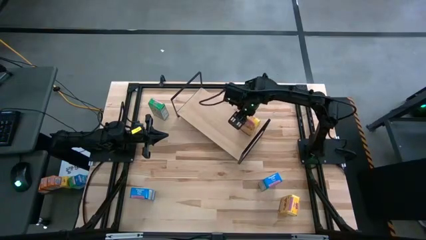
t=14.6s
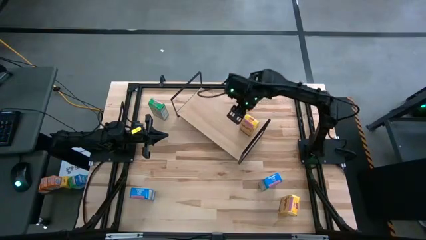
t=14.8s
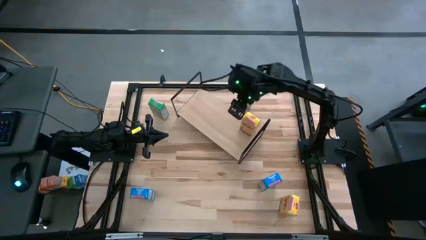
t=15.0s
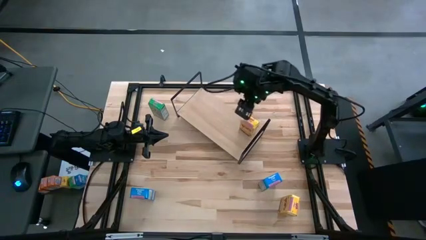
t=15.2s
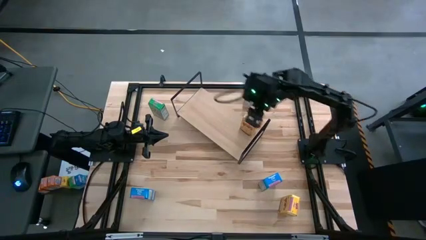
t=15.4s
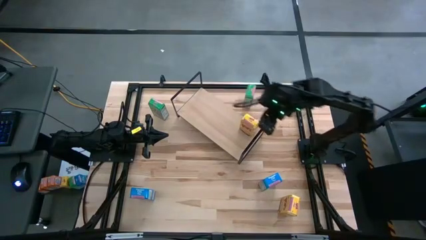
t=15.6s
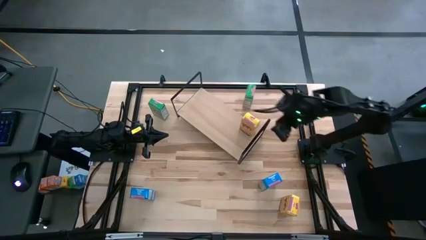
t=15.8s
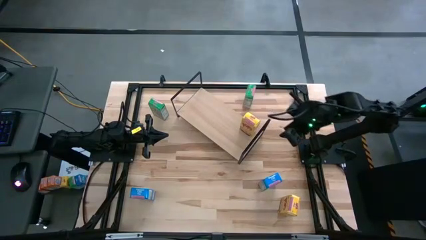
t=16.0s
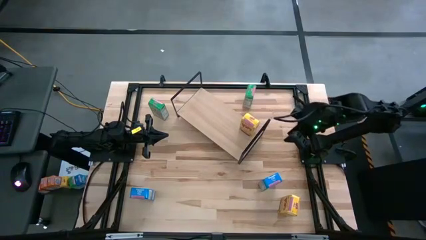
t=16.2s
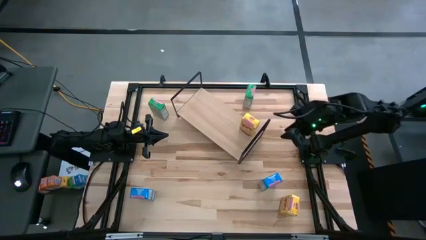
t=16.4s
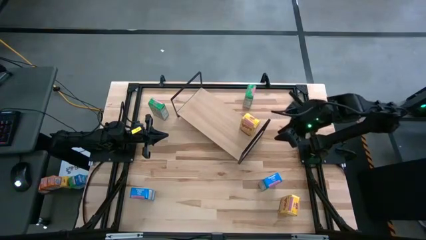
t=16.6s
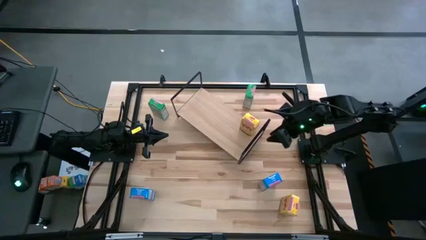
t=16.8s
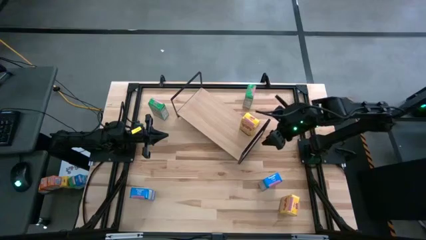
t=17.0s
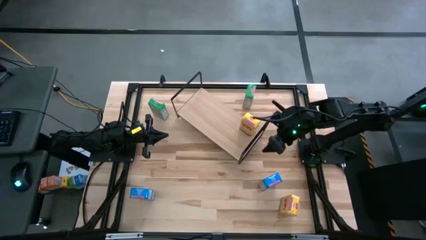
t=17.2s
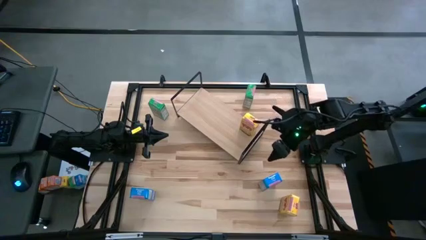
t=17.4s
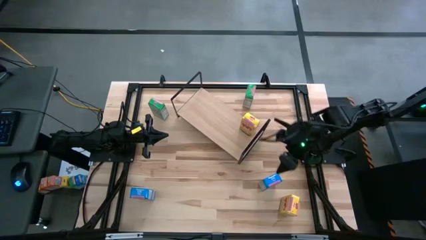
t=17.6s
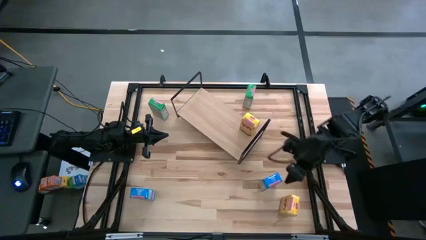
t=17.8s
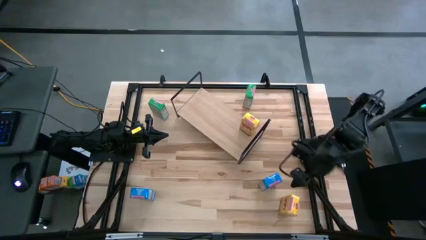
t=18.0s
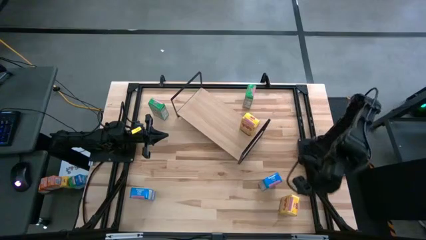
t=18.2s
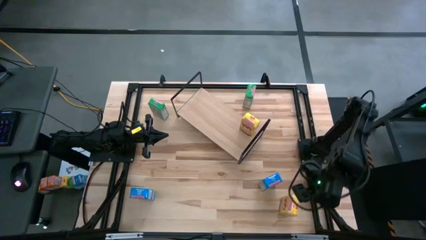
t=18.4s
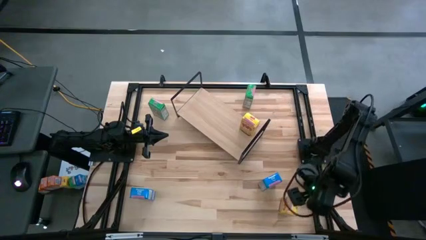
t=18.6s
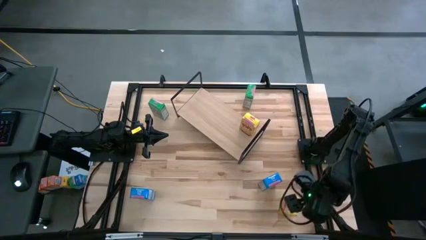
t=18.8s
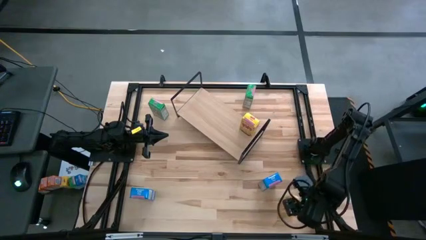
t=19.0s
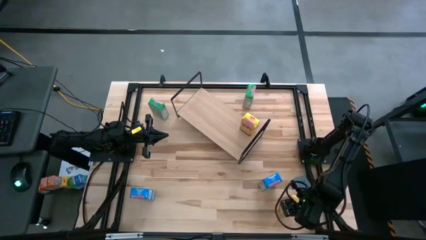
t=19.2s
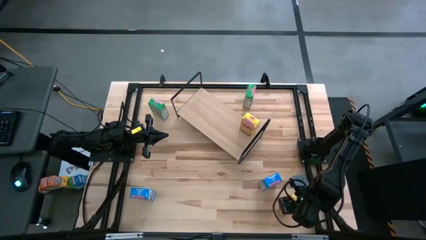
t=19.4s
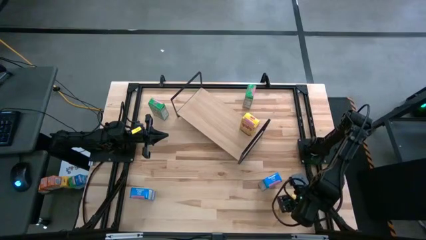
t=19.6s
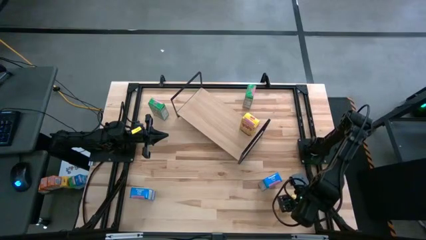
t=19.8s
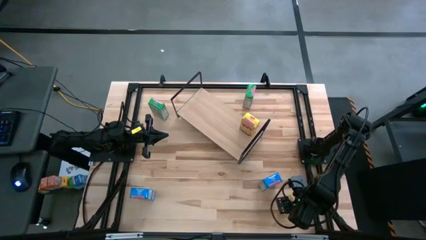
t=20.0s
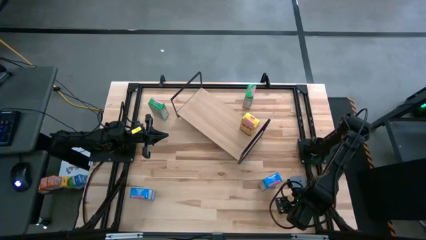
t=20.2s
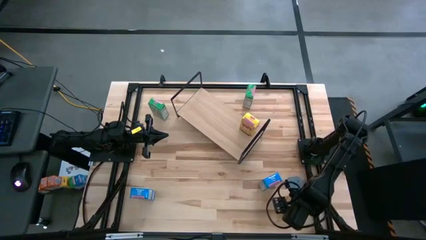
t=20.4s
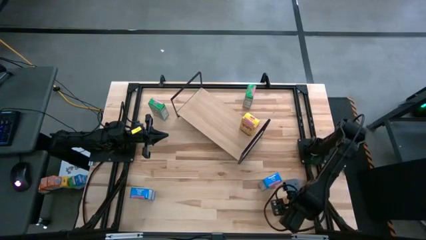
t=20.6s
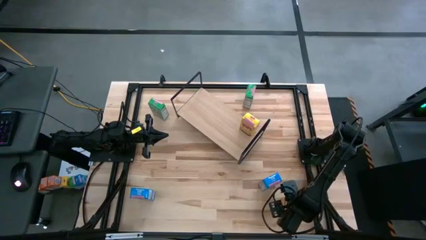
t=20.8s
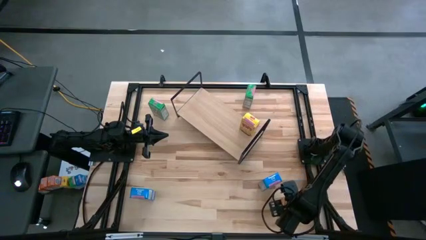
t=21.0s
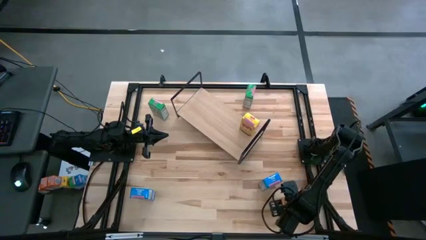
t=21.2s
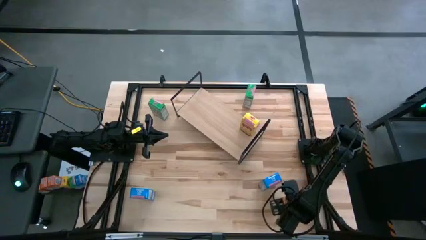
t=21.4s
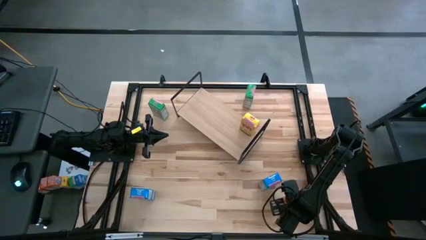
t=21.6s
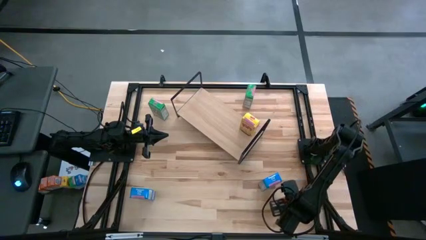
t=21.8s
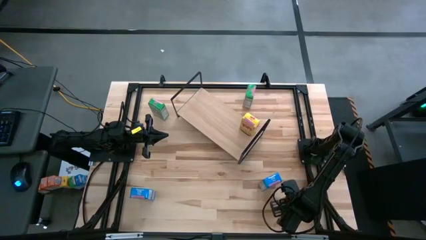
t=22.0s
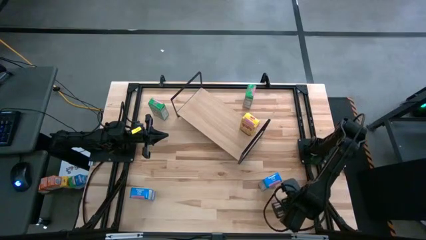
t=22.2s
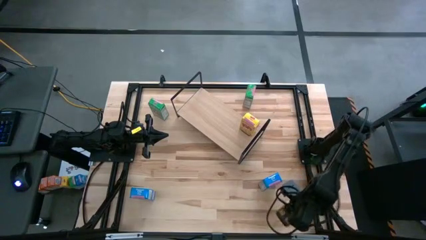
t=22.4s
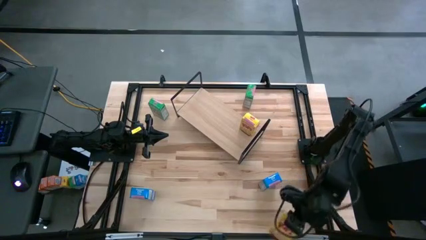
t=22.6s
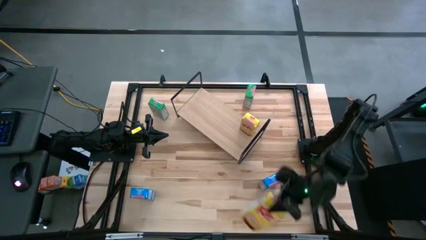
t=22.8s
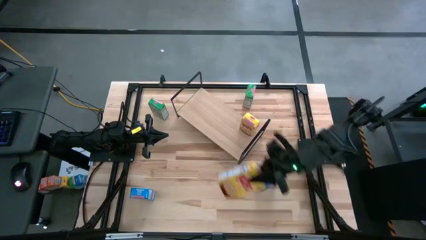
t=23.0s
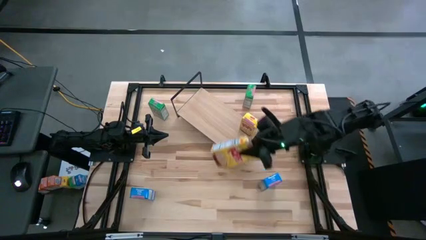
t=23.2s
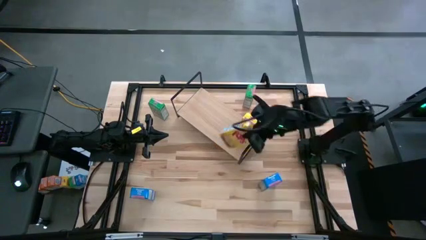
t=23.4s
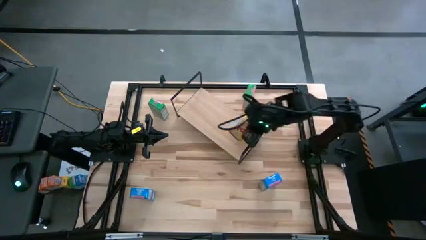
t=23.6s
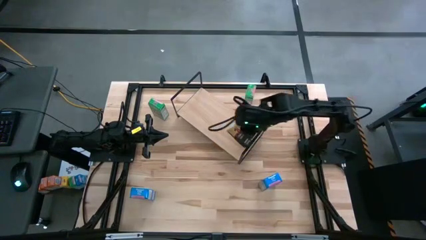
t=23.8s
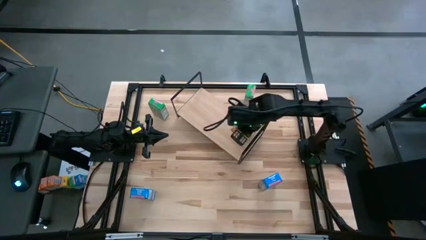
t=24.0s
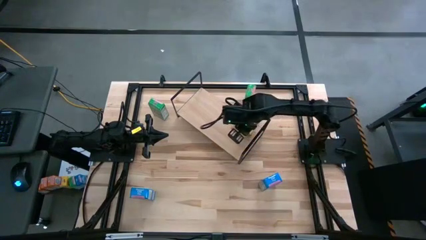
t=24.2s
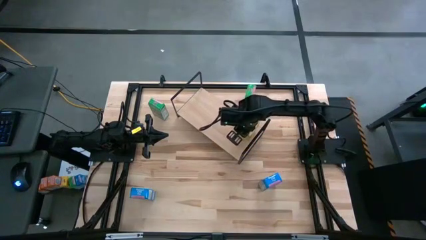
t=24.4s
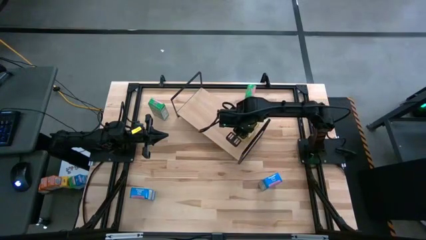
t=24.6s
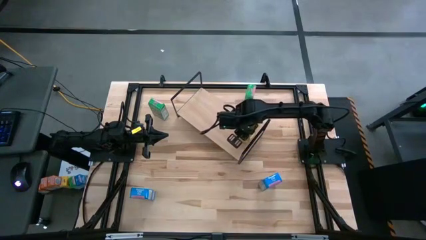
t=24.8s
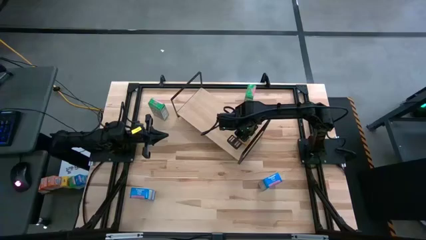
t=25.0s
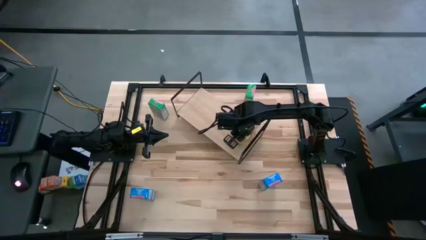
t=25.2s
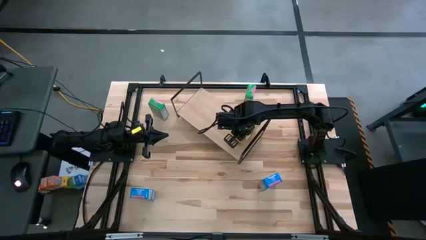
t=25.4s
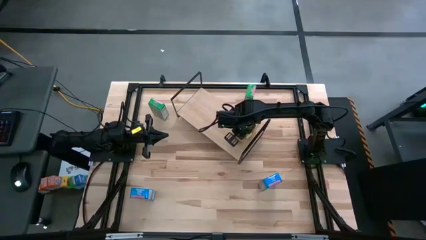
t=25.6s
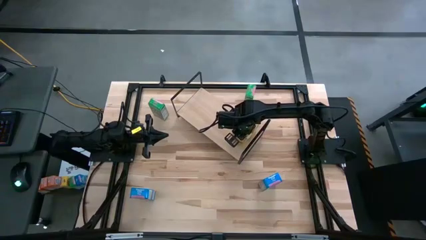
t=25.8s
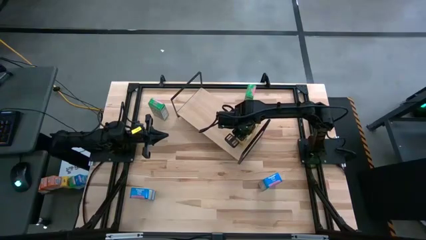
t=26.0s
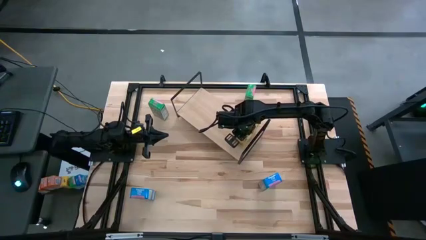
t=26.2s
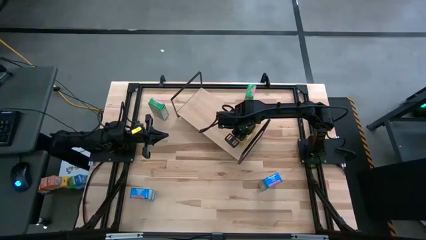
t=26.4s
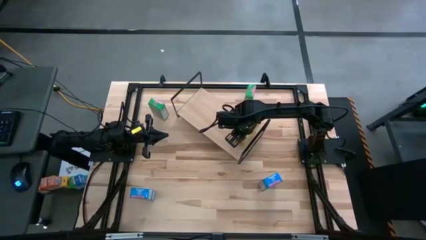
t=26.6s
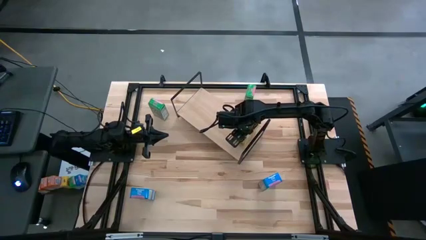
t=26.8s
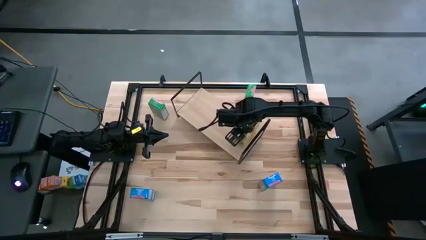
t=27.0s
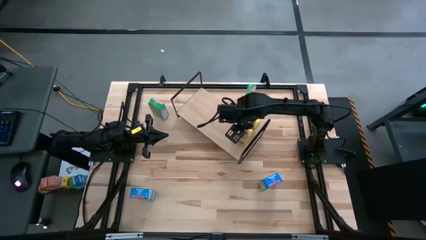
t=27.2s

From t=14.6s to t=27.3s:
Task: Stack cereal on shelf
Put the yellow cereal box on the shelf aligned with the other yellow cereal box
